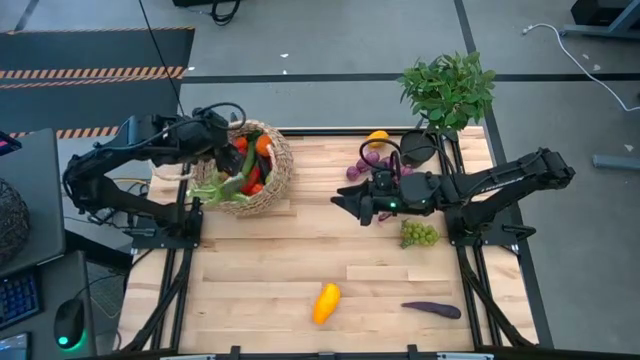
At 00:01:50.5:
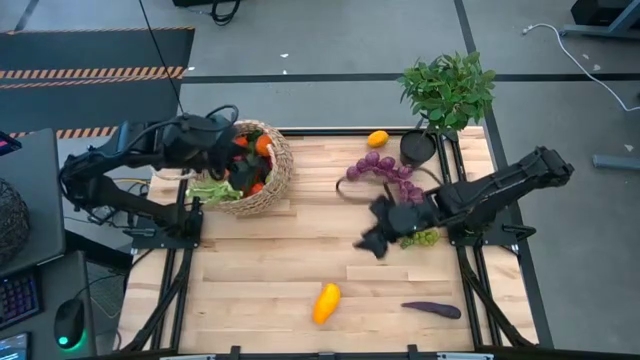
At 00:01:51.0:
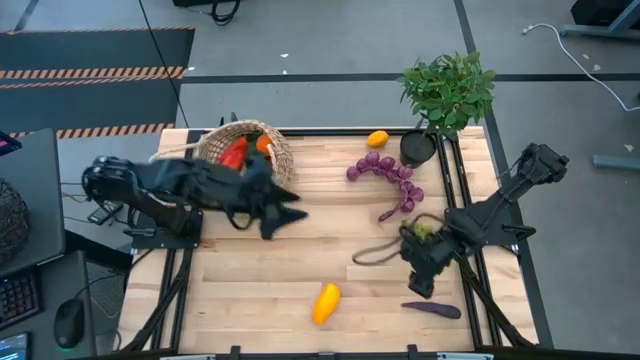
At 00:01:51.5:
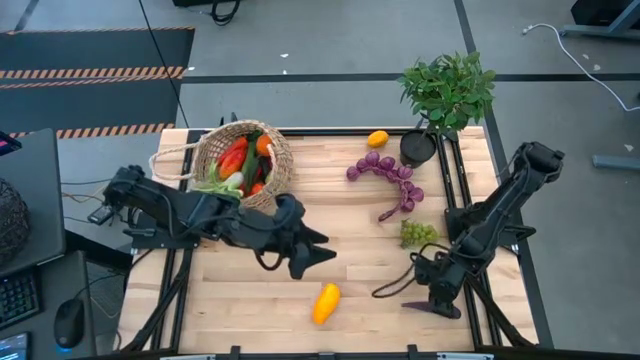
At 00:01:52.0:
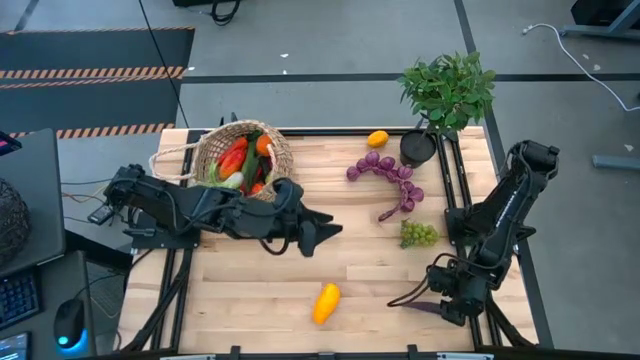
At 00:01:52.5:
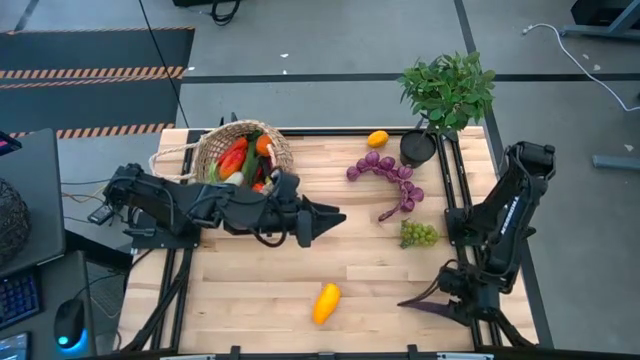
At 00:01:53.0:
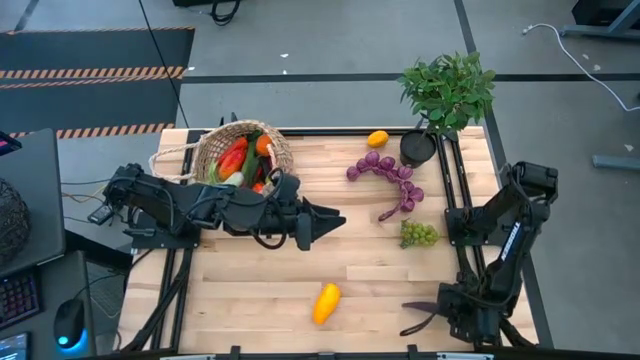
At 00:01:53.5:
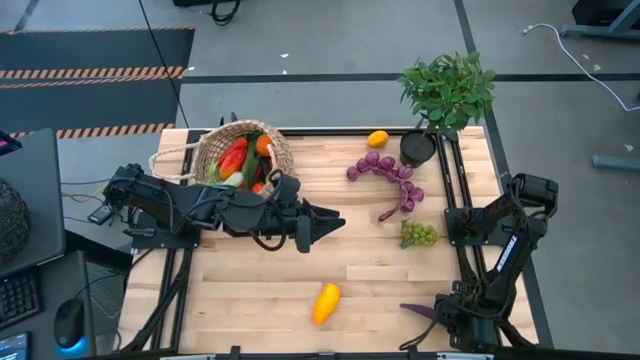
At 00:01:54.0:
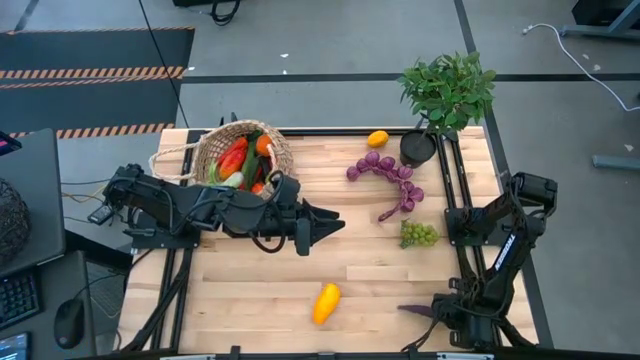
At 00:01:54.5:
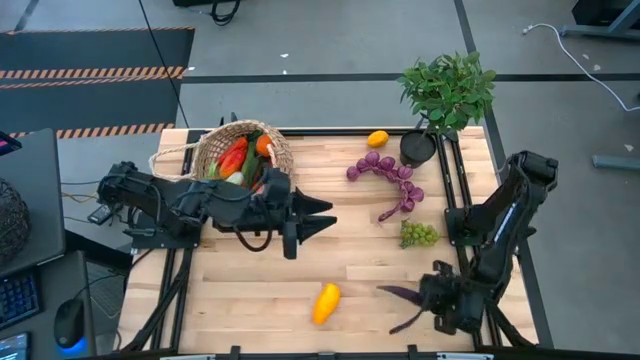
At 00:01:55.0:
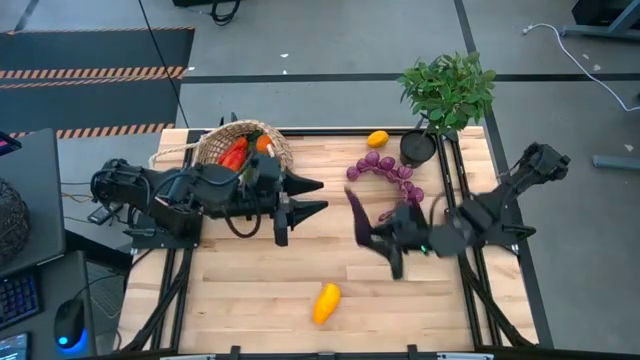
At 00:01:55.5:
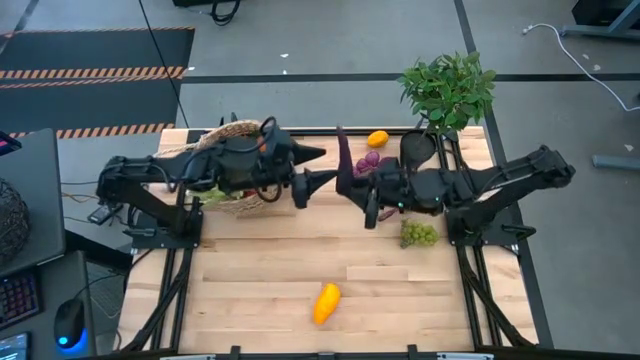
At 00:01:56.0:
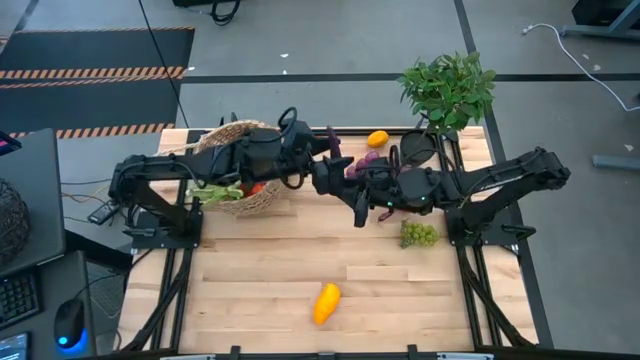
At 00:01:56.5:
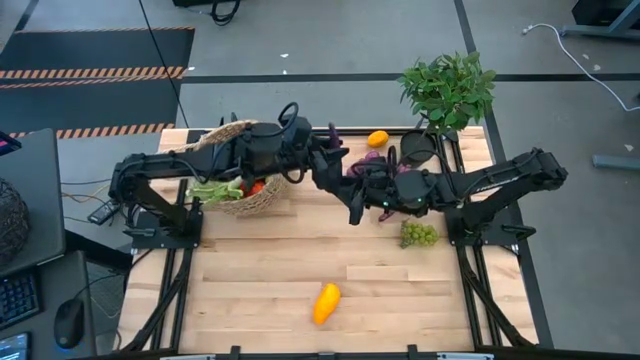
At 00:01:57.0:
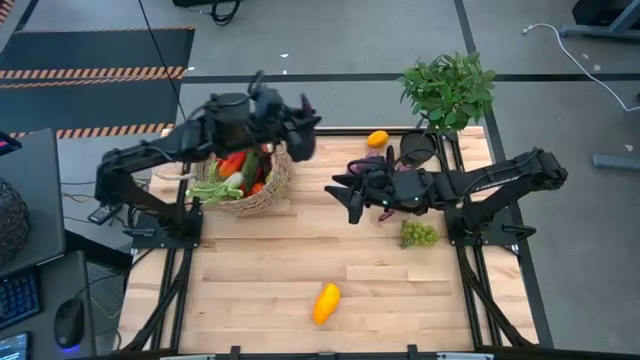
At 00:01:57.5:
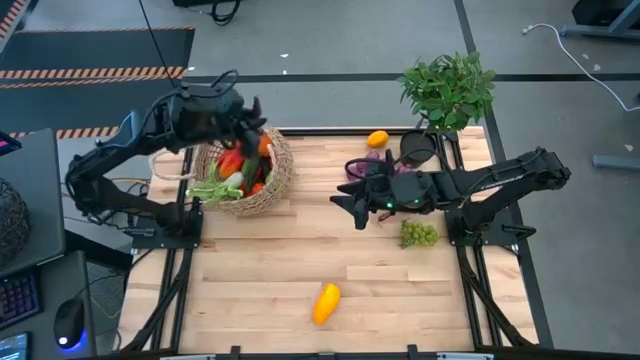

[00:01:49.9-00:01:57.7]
Task: Build produce basket
Put the violet eggplant into the brown basket

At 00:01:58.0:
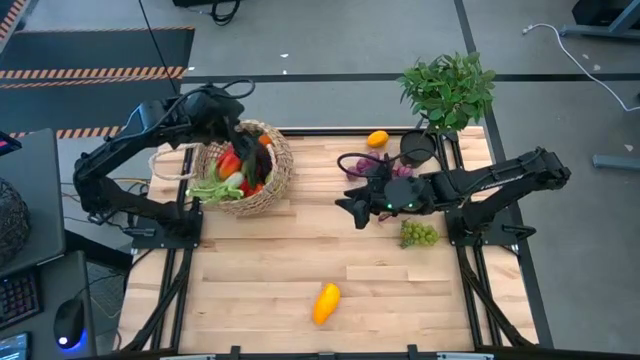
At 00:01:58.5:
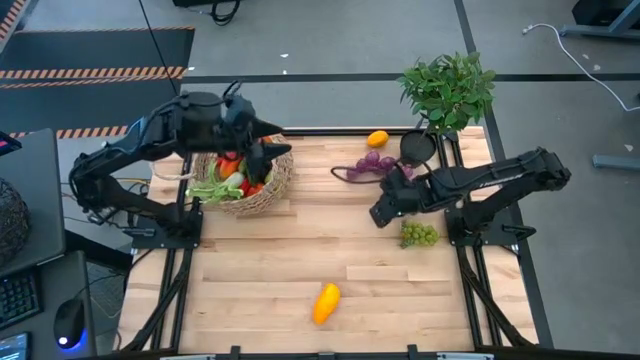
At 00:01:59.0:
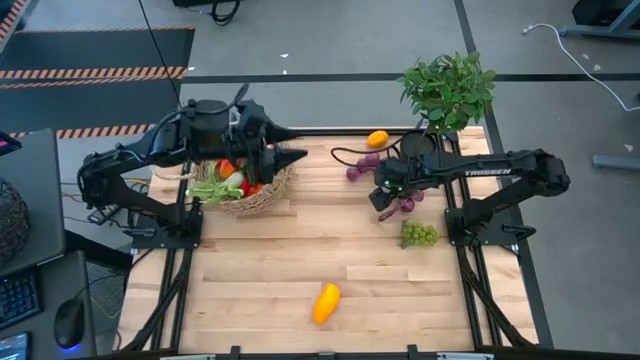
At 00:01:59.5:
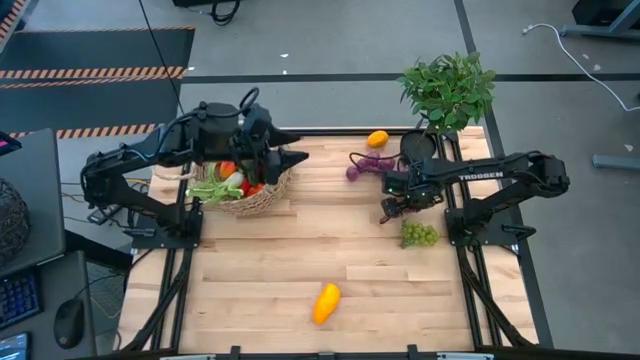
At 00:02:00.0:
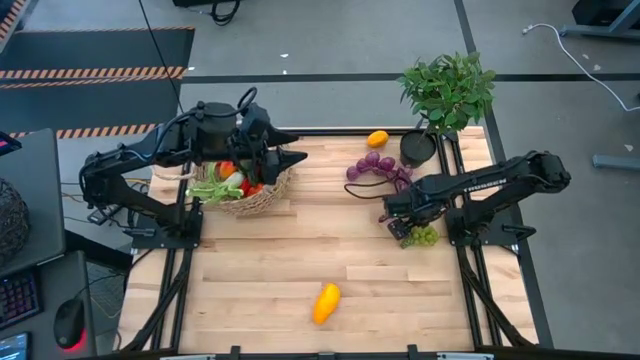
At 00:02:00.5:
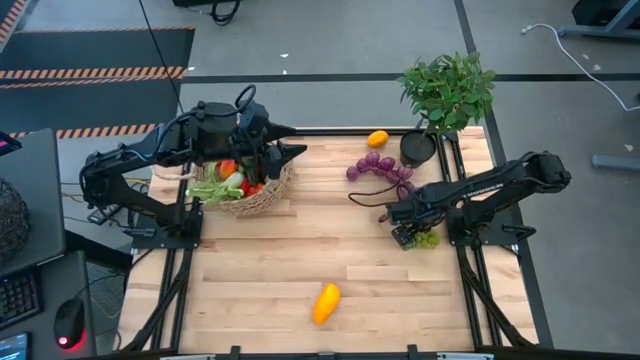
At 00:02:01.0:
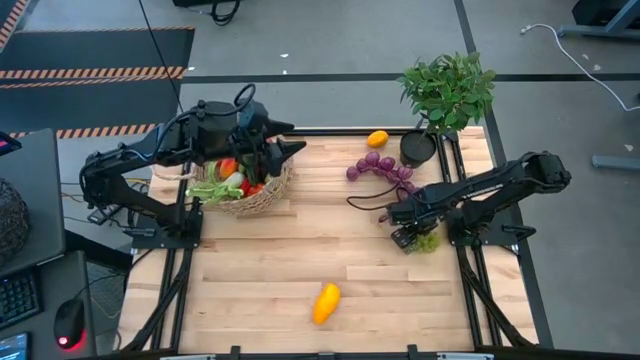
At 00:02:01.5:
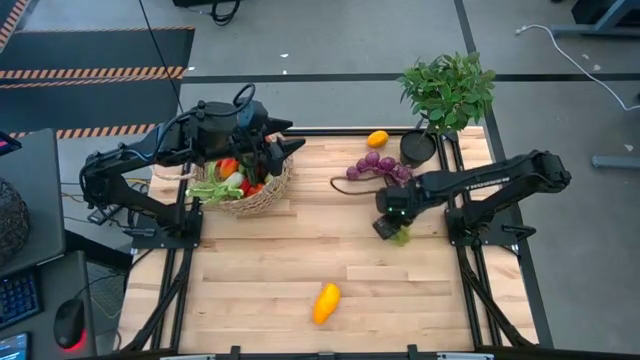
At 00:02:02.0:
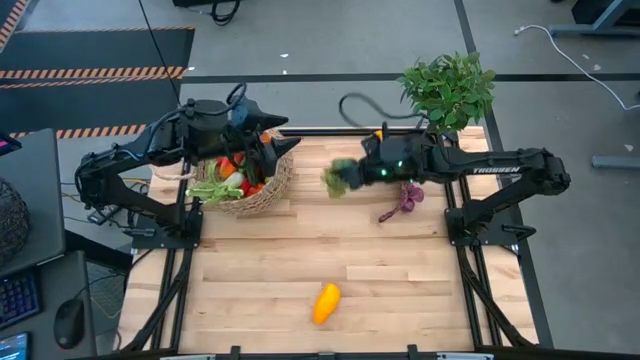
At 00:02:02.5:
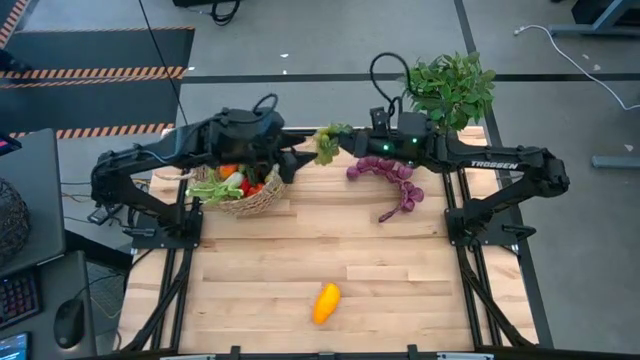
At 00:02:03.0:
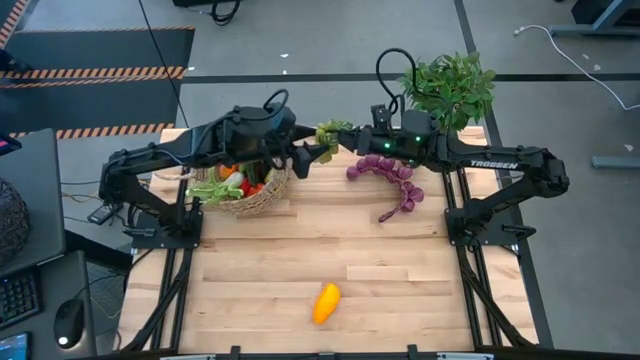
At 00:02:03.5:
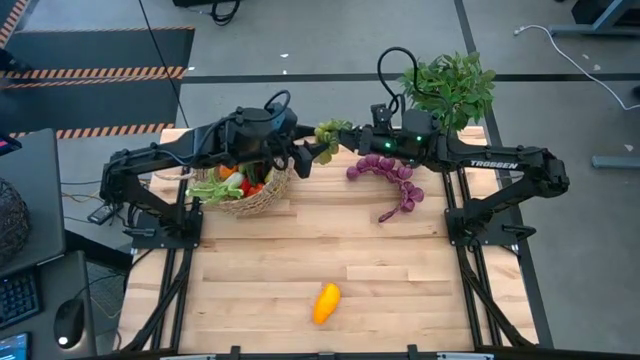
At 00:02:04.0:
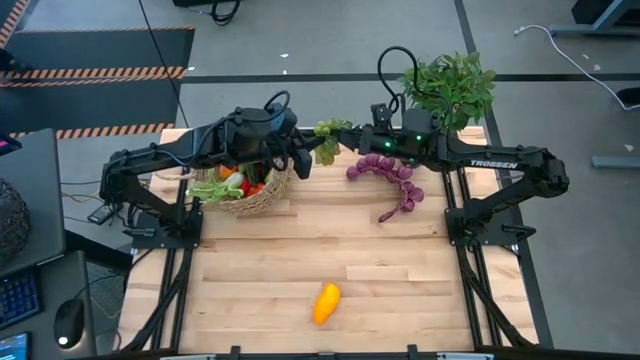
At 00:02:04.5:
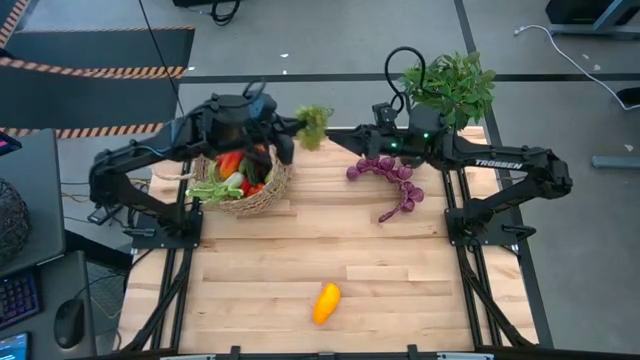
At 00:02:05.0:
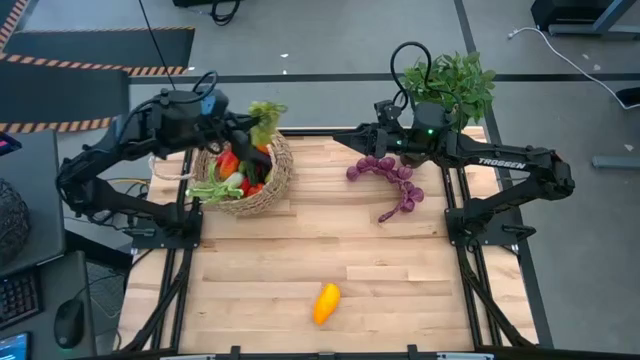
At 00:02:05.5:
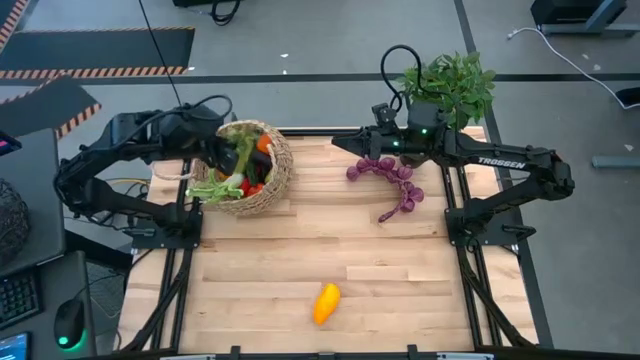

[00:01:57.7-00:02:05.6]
Put the green grapes into the brown basket

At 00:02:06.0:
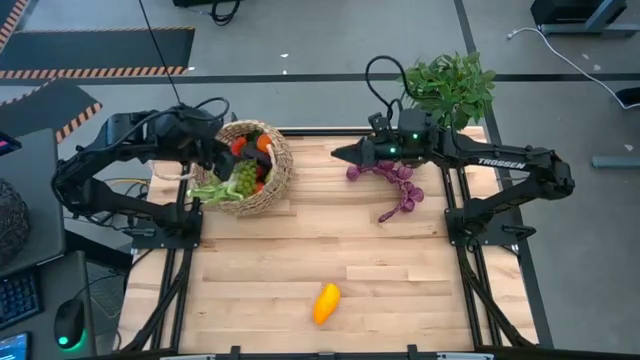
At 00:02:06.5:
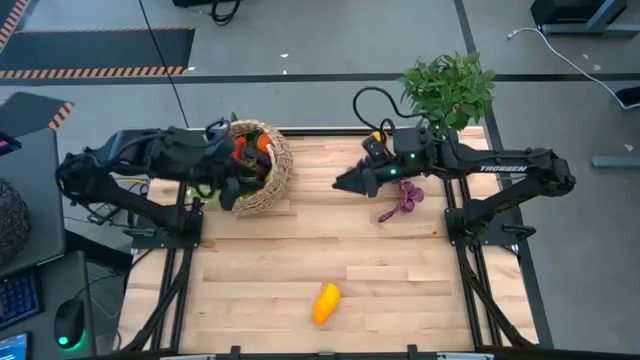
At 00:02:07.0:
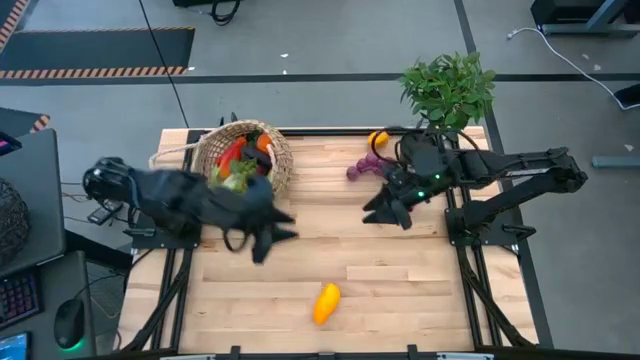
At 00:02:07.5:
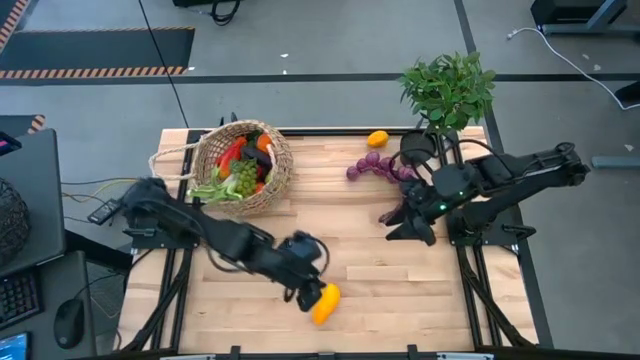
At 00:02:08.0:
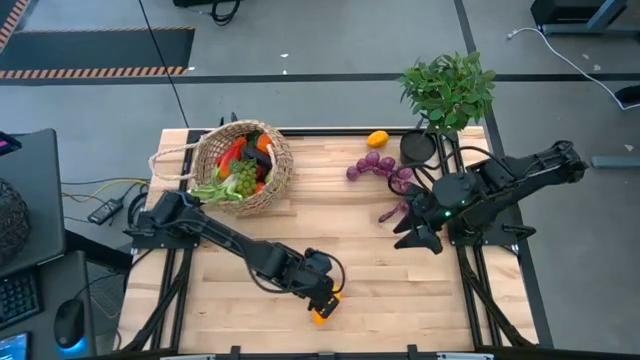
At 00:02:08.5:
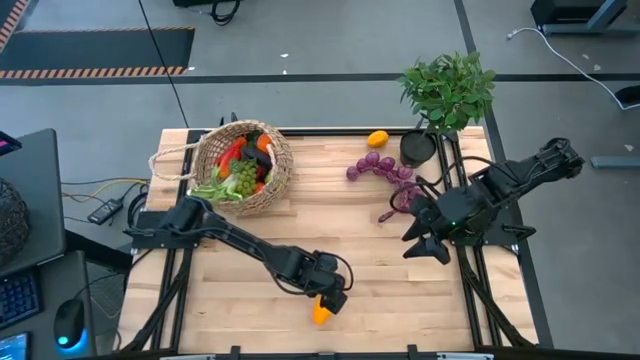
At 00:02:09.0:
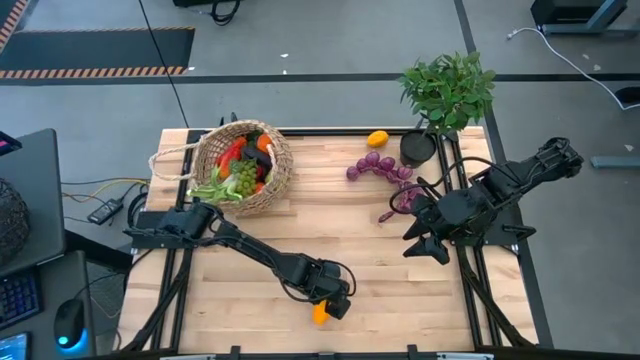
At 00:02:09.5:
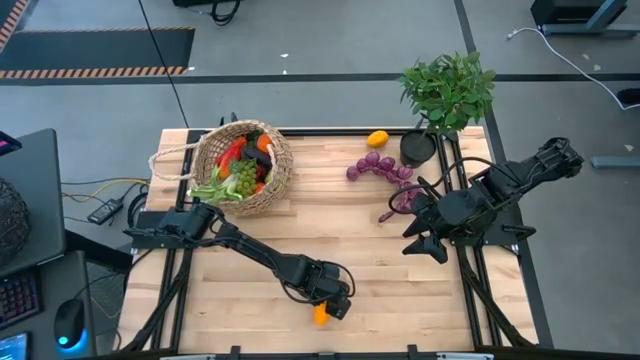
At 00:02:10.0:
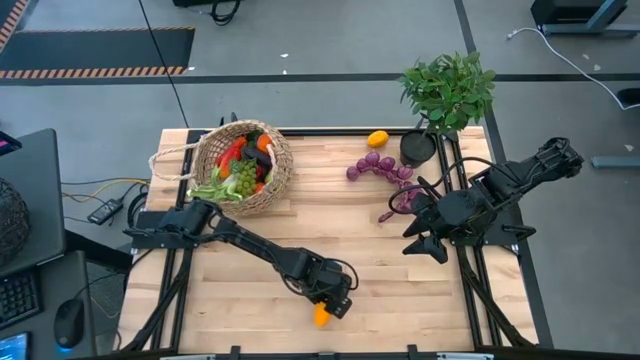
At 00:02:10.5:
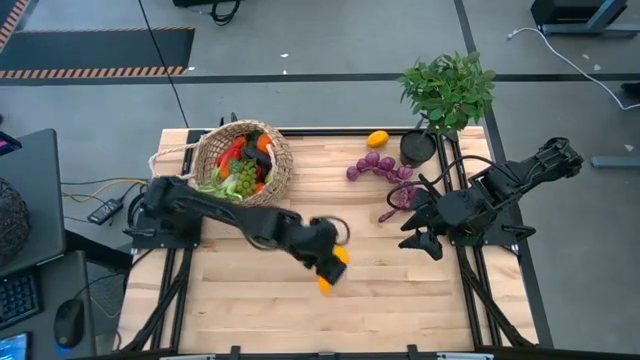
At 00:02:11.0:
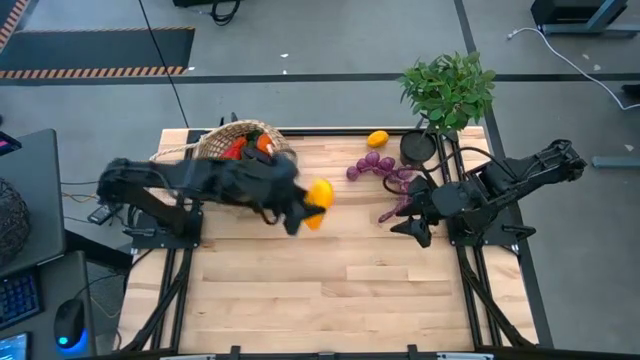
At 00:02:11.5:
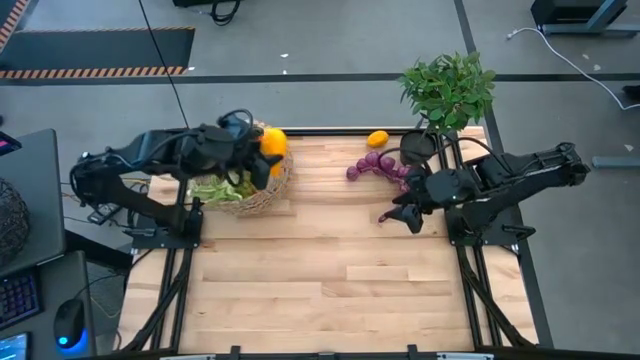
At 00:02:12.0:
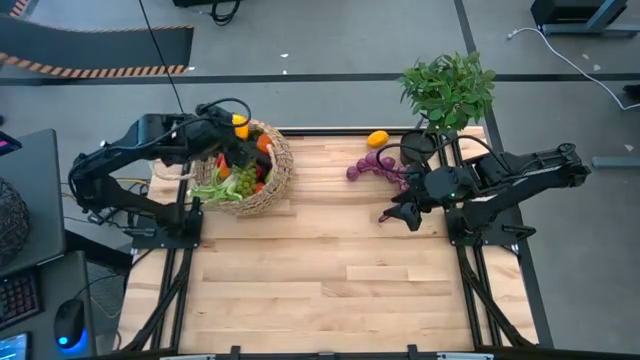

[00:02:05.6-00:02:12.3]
Put the yellow mango into the brown basket
